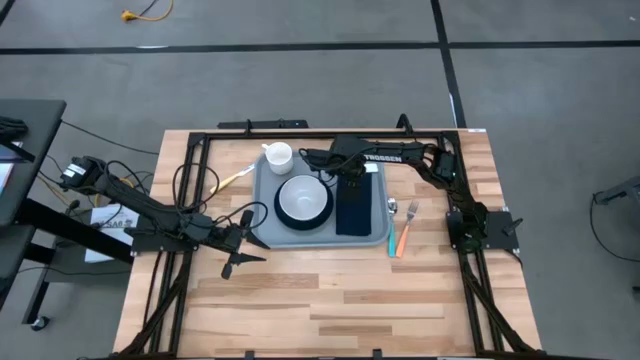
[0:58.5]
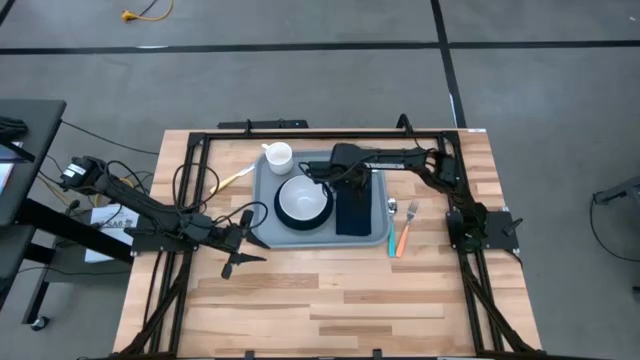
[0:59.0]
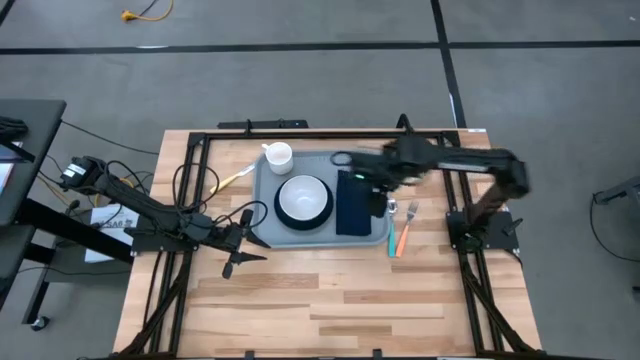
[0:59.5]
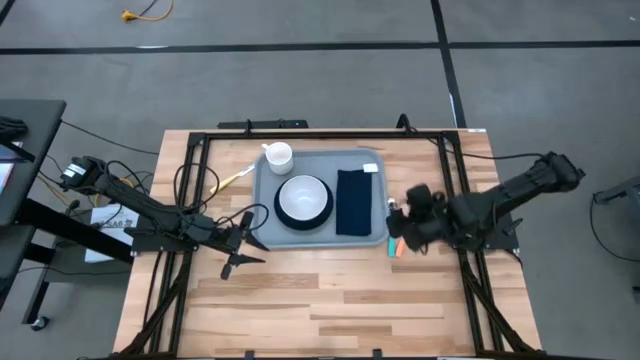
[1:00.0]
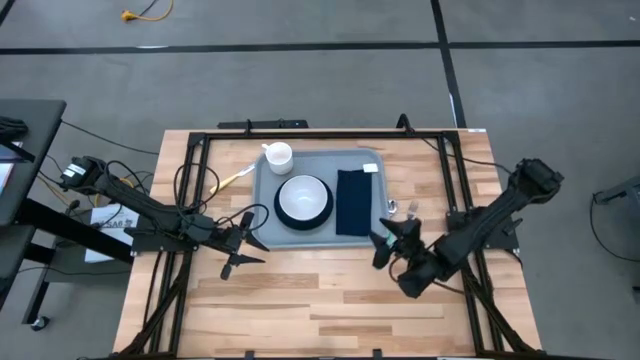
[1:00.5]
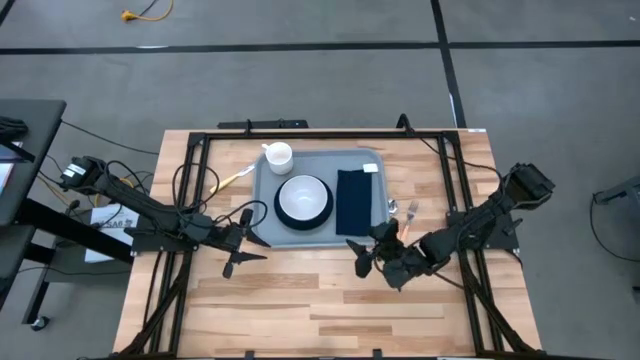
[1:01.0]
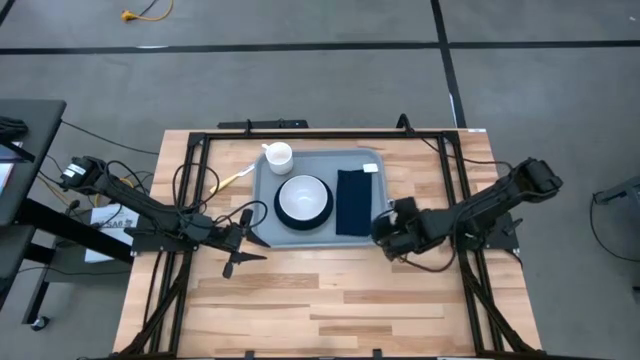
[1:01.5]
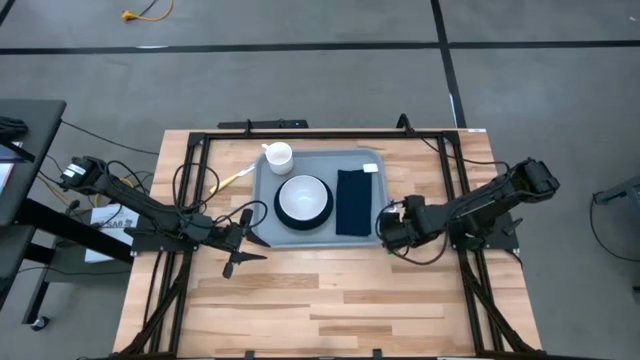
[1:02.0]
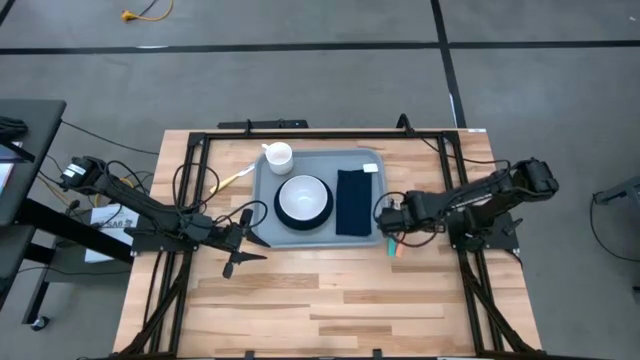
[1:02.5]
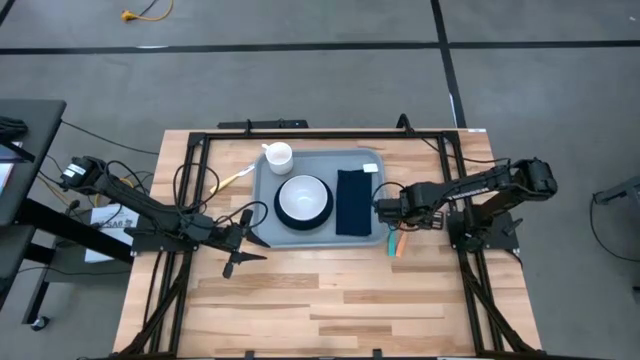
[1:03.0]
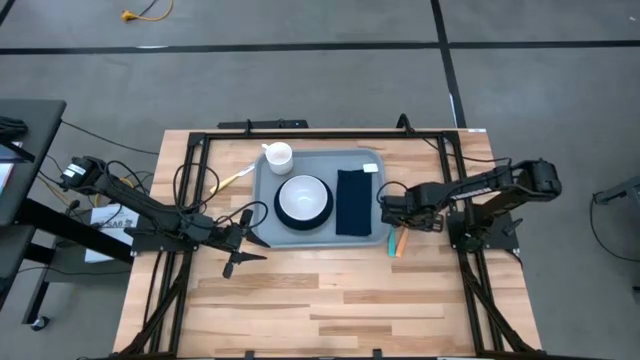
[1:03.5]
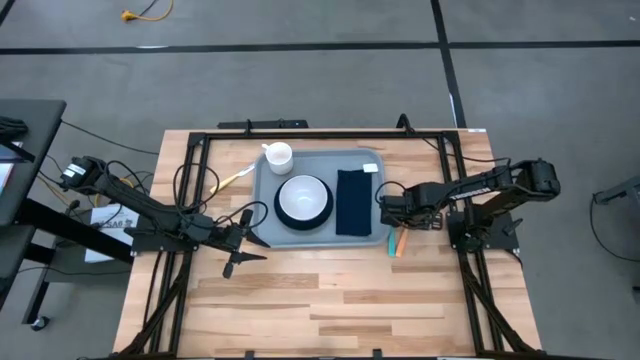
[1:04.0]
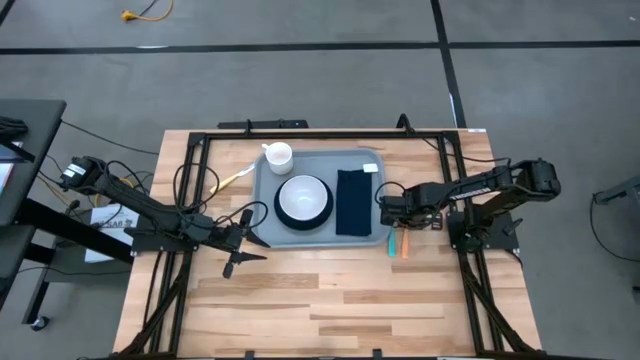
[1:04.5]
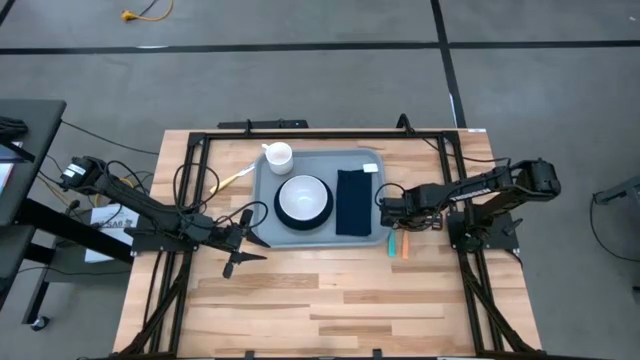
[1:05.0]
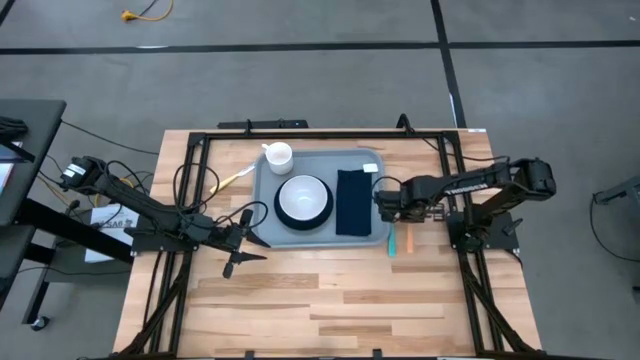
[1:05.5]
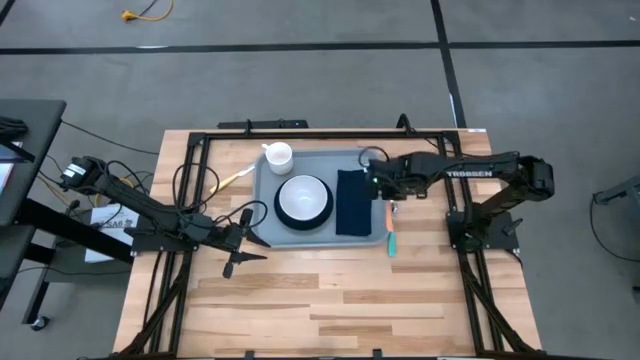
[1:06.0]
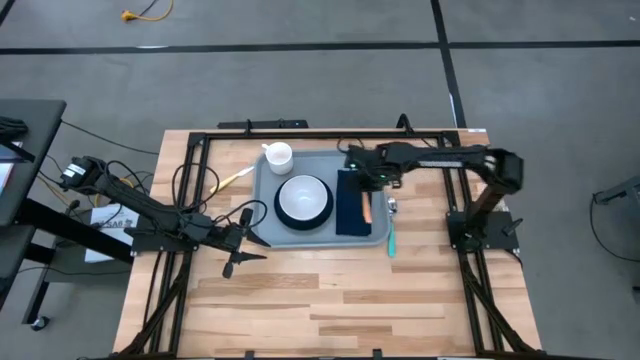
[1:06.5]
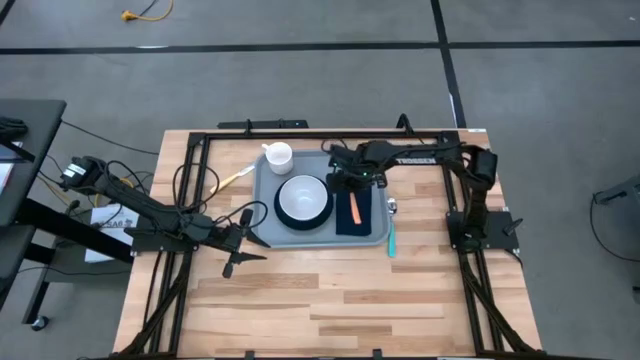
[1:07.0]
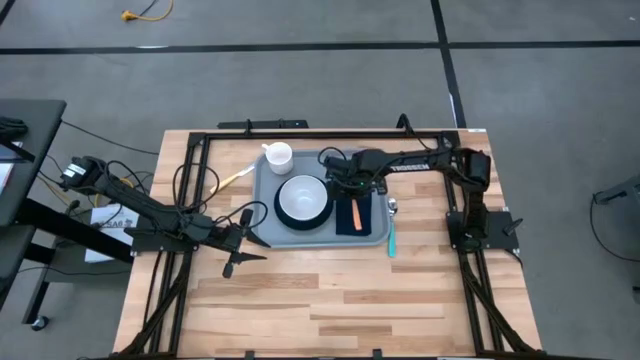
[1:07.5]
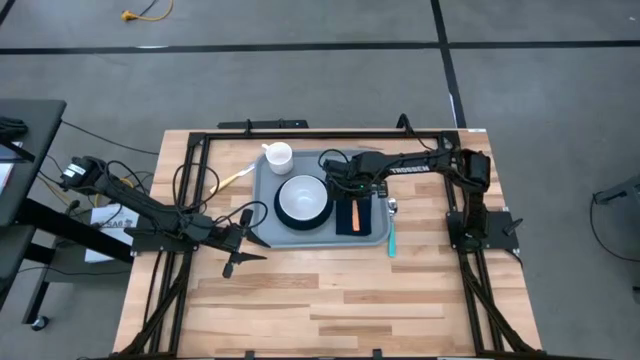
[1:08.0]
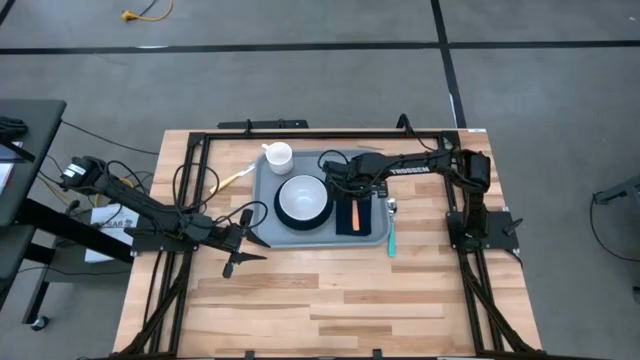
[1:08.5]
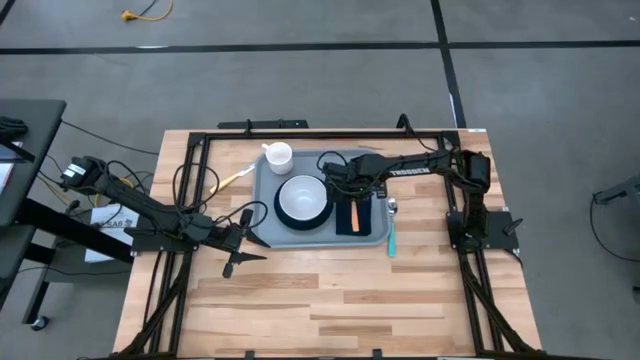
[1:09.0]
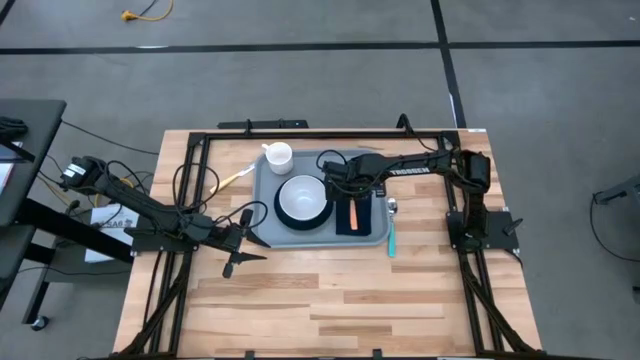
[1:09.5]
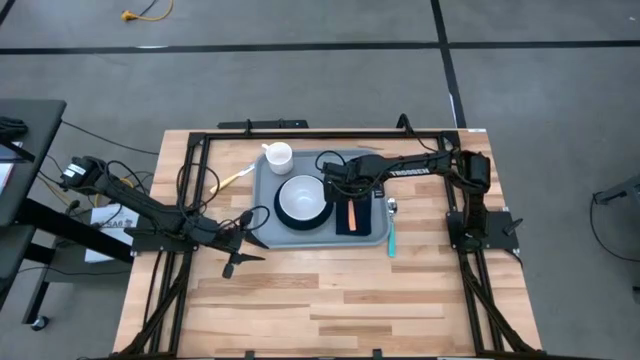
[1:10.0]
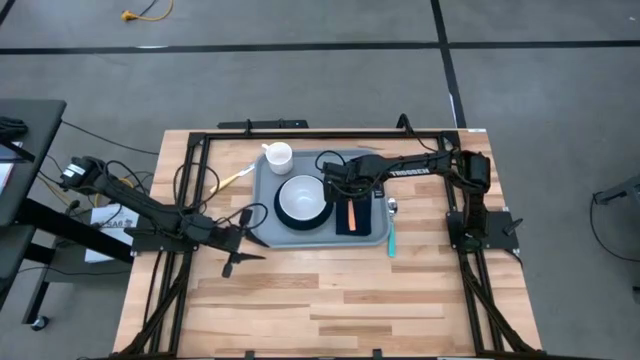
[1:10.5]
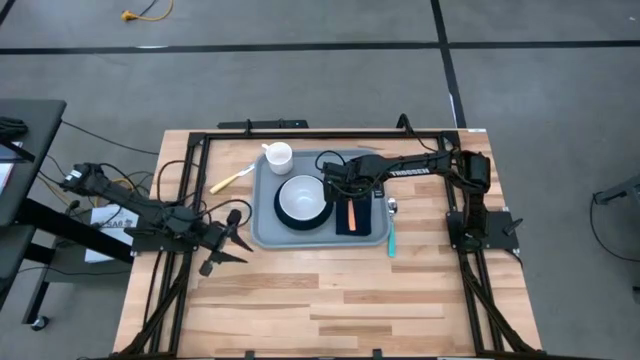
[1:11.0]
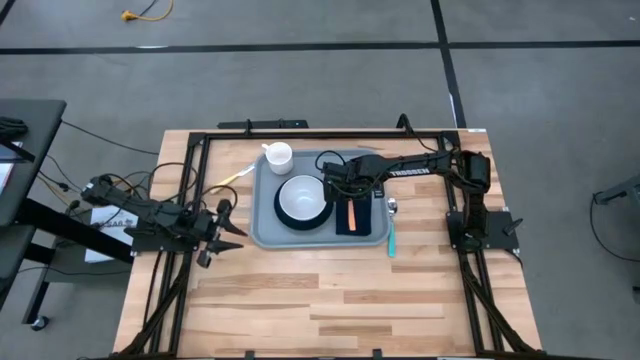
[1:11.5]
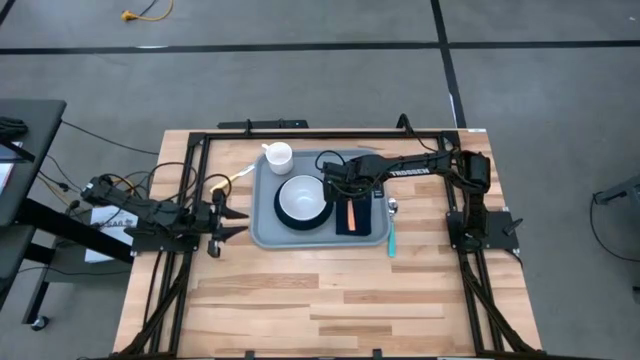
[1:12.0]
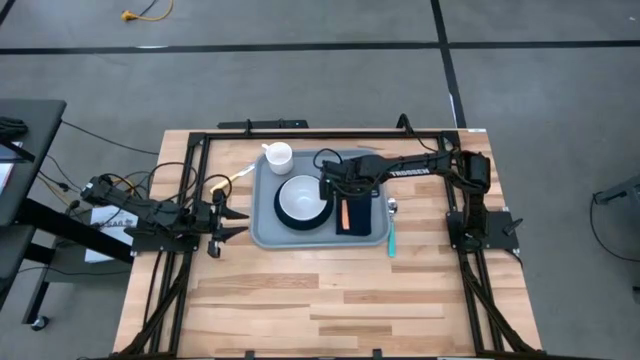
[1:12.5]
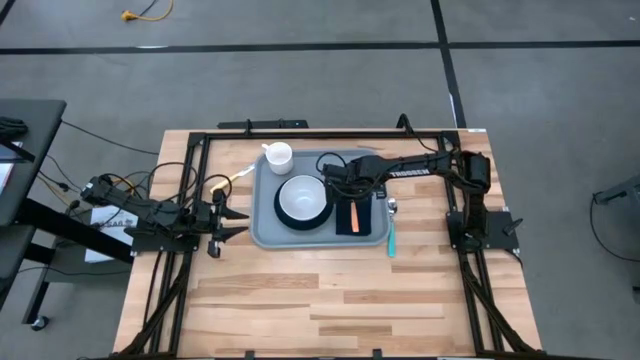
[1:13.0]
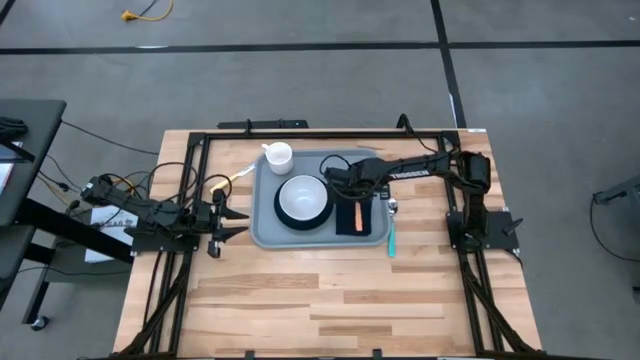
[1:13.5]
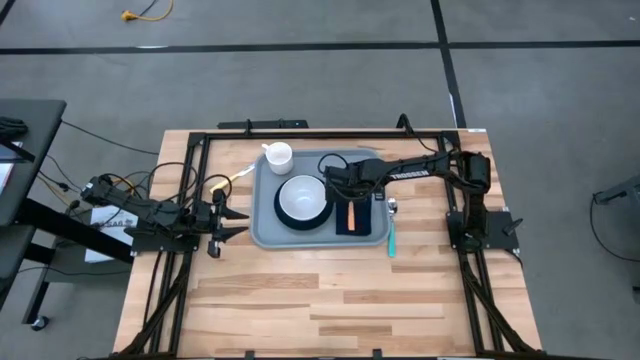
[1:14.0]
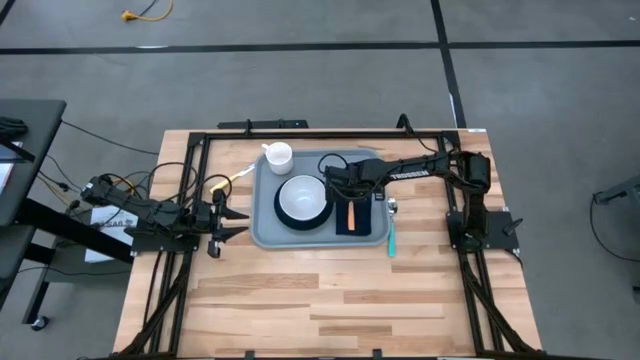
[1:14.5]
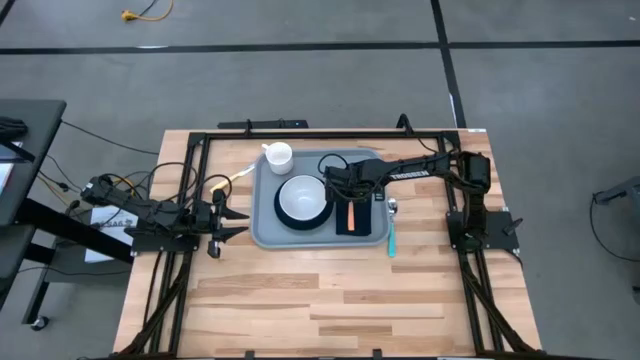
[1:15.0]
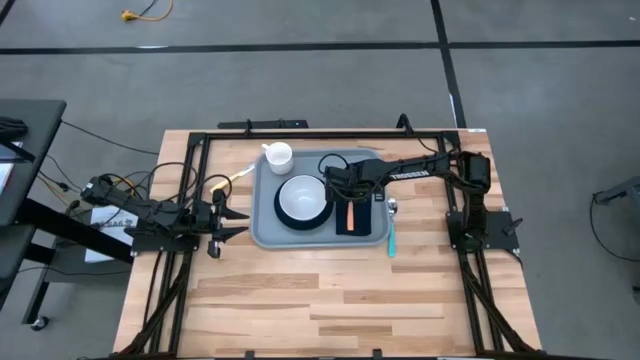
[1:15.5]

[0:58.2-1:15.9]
Task: Set up tray
Put the orange fork on top of the black napkin

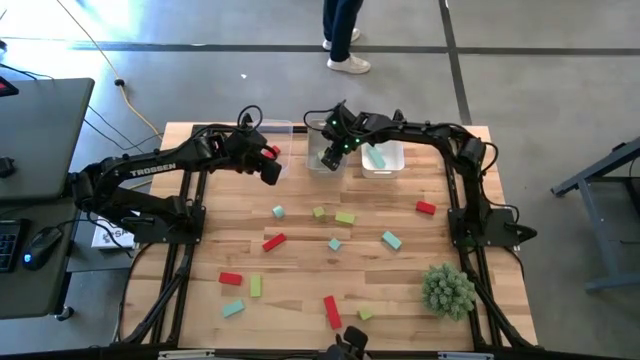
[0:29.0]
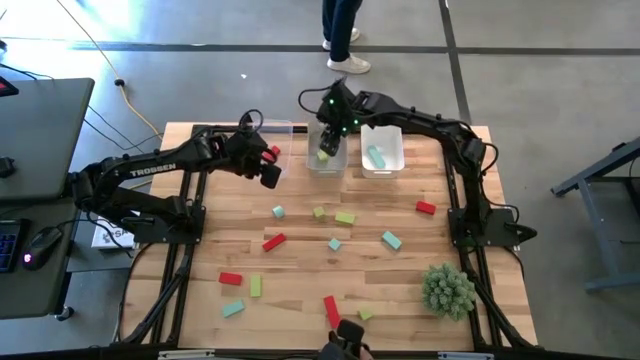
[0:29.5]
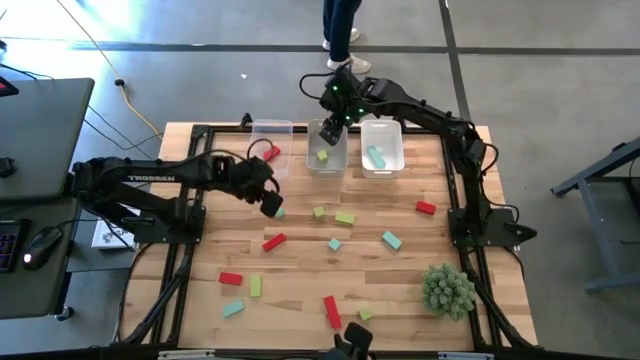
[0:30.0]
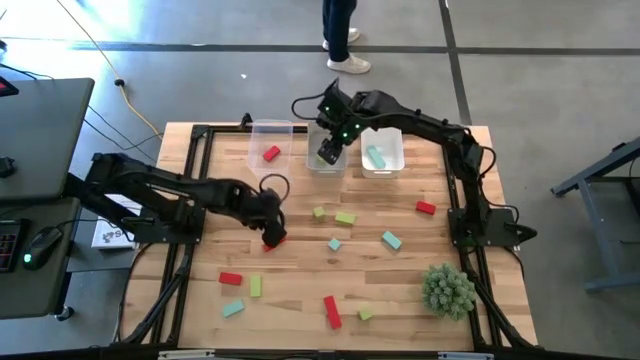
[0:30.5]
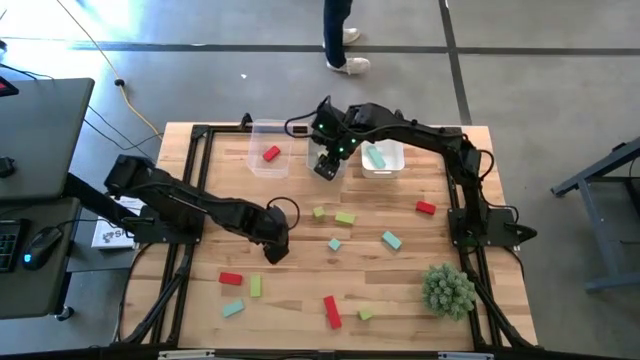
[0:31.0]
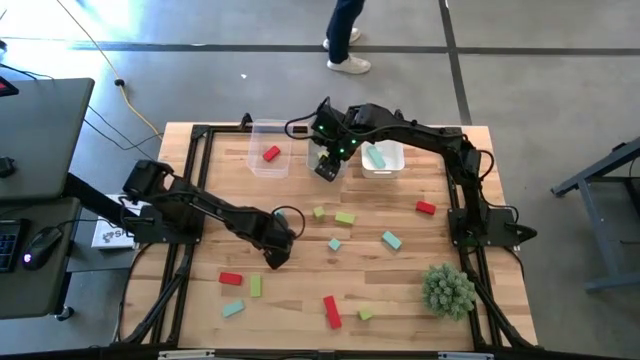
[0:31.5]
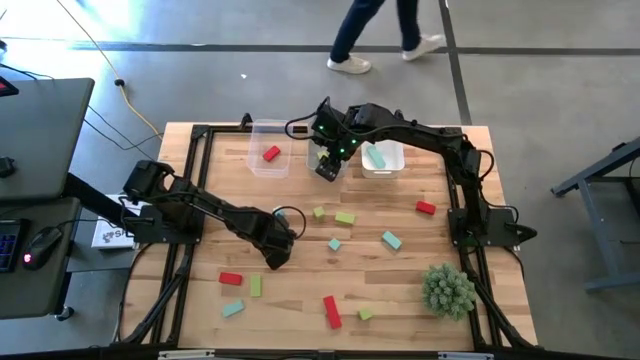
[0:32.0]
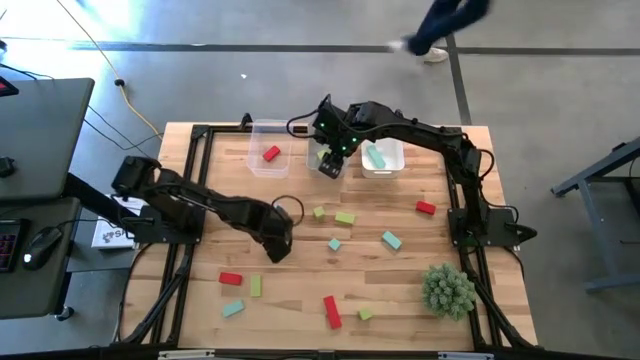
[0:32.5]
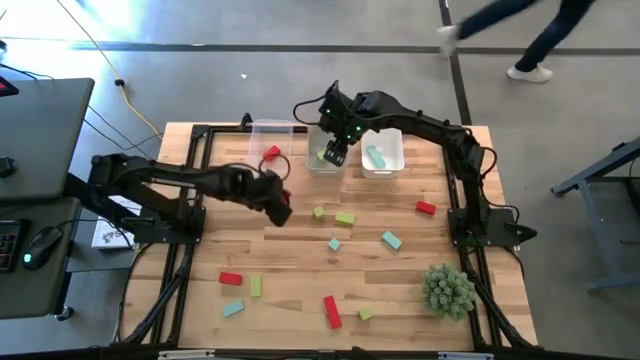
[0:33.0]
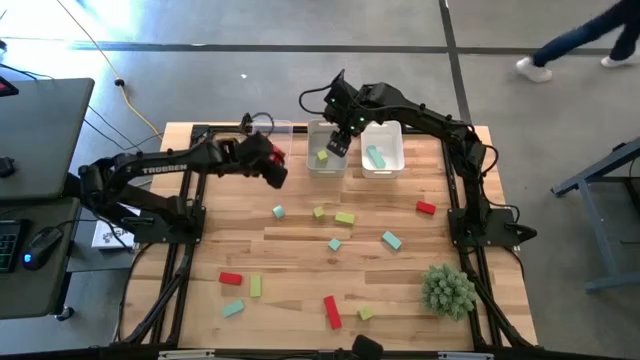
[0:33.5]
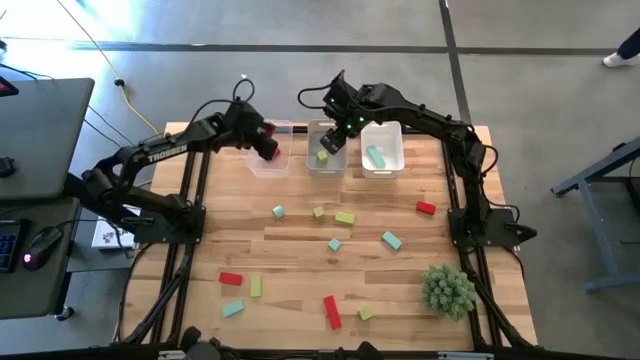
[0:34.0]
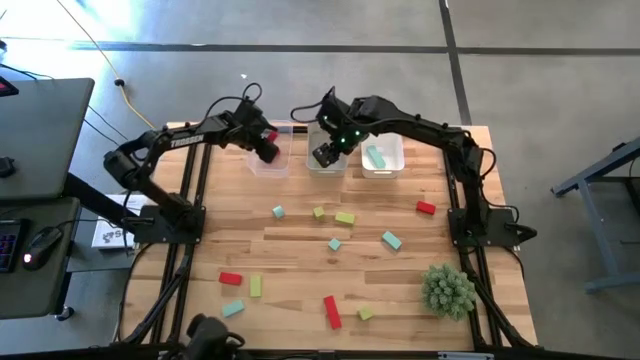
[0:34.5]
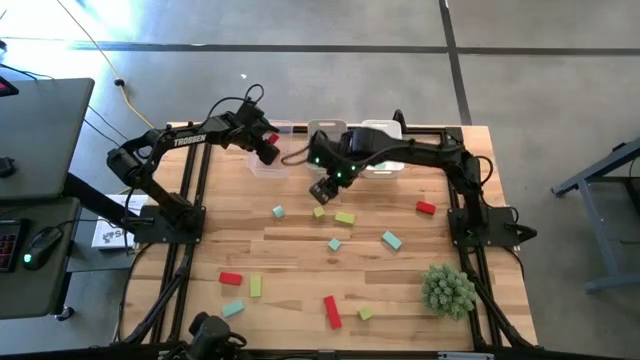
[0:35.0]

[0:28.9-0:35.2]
Task: Sort & place blocks by color
Put the red block into the transparent bin
